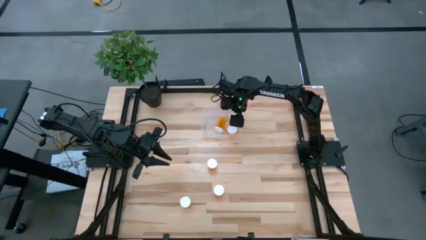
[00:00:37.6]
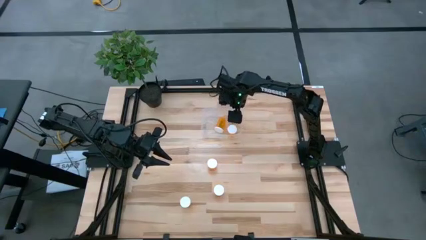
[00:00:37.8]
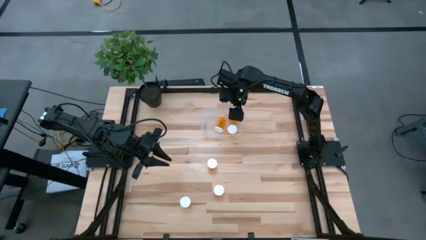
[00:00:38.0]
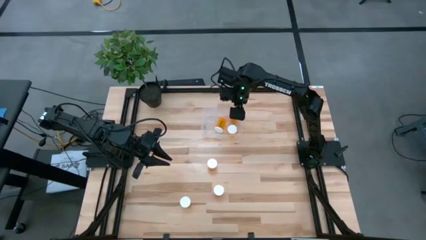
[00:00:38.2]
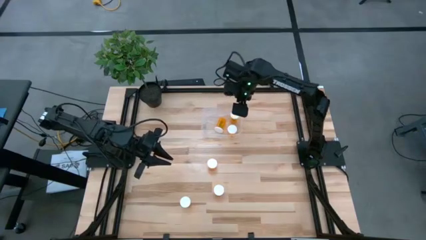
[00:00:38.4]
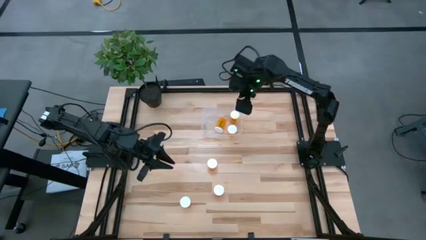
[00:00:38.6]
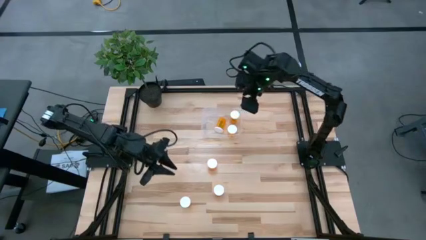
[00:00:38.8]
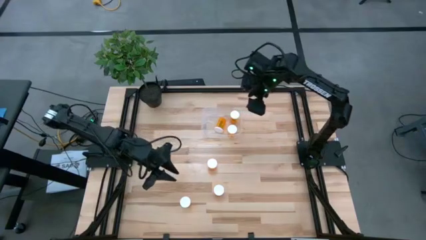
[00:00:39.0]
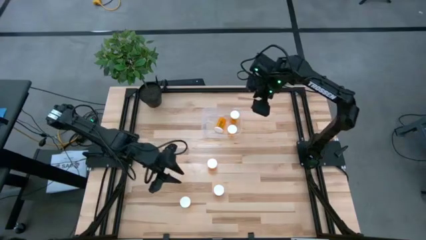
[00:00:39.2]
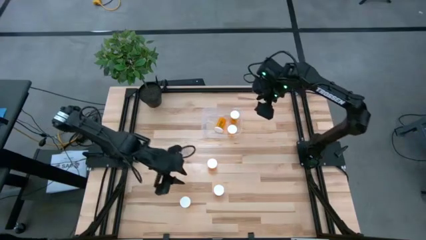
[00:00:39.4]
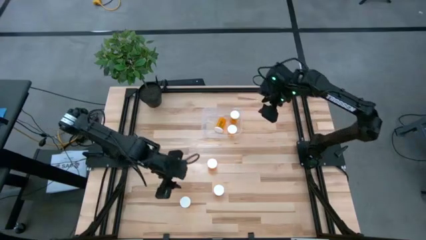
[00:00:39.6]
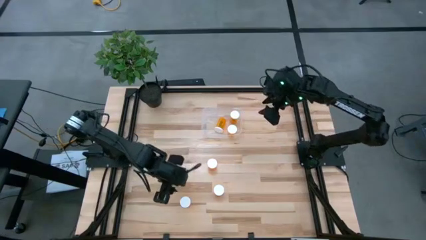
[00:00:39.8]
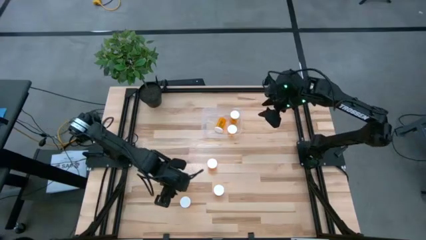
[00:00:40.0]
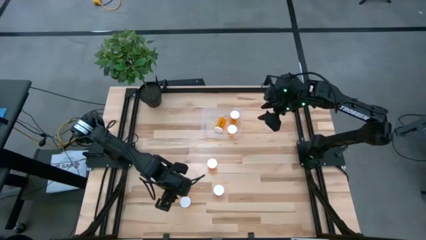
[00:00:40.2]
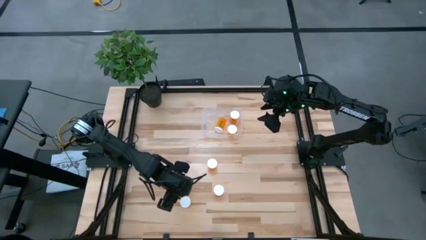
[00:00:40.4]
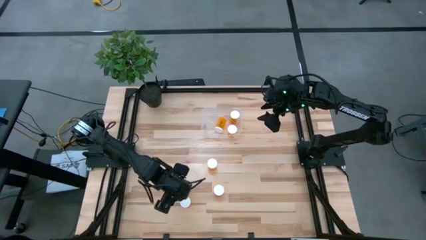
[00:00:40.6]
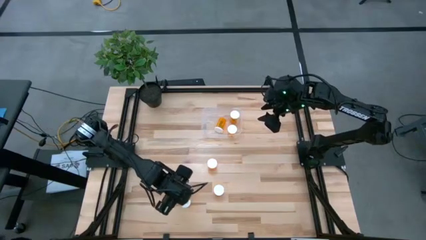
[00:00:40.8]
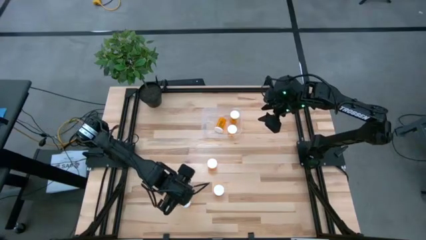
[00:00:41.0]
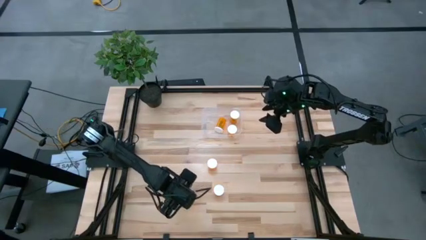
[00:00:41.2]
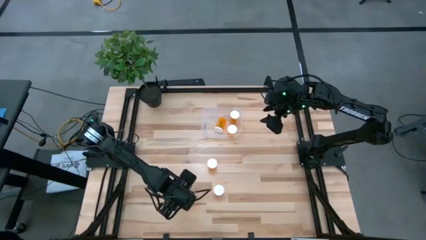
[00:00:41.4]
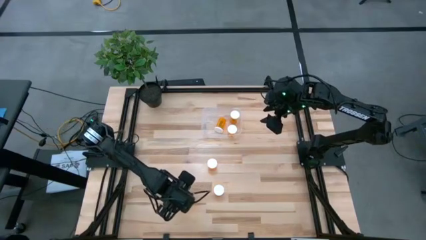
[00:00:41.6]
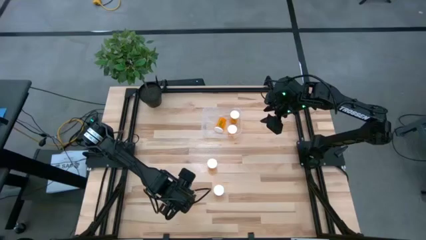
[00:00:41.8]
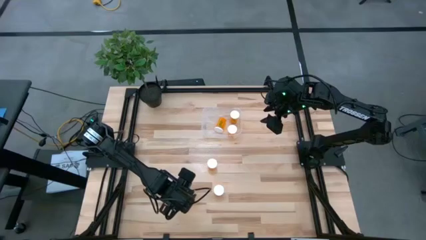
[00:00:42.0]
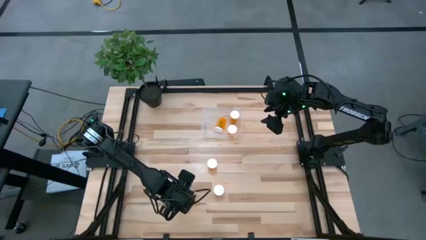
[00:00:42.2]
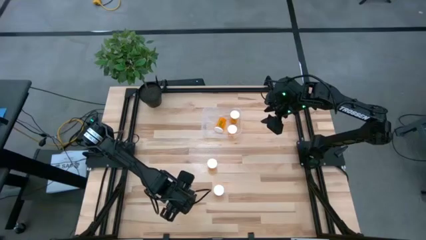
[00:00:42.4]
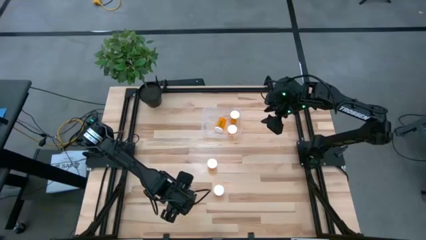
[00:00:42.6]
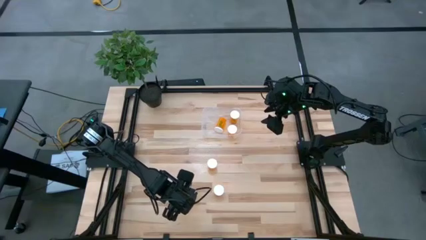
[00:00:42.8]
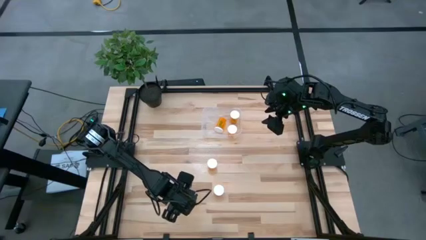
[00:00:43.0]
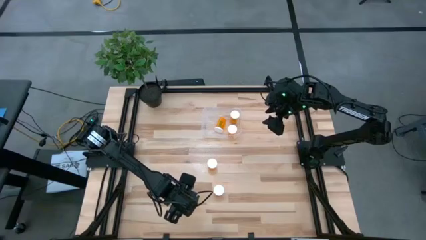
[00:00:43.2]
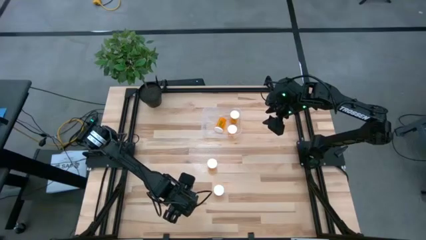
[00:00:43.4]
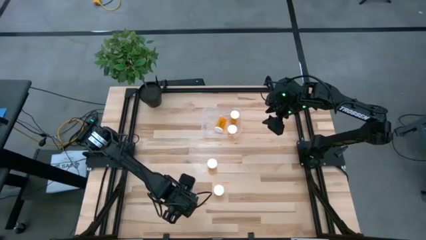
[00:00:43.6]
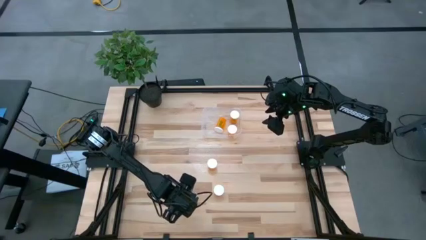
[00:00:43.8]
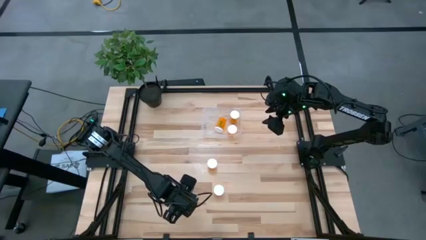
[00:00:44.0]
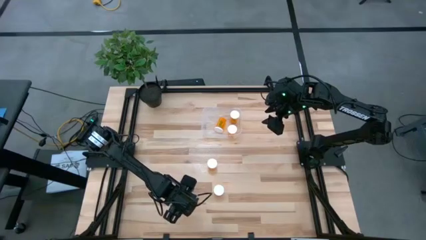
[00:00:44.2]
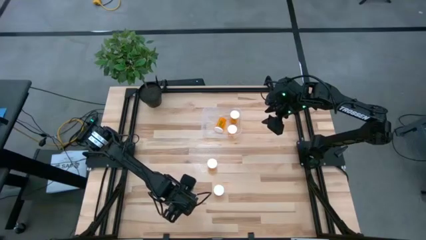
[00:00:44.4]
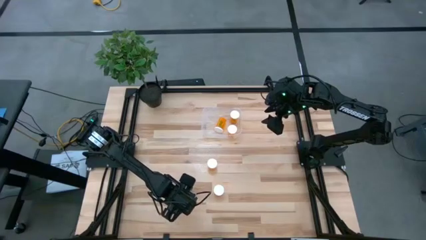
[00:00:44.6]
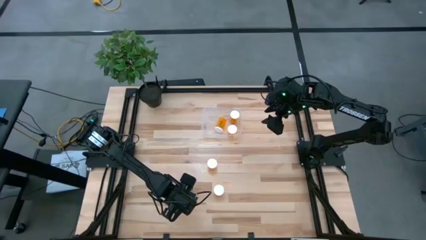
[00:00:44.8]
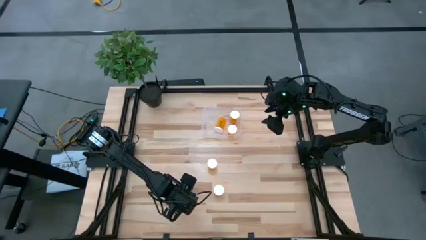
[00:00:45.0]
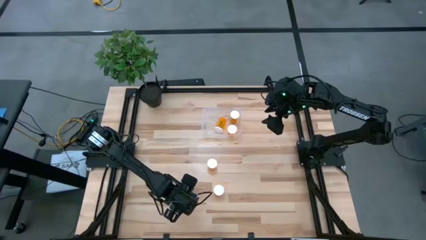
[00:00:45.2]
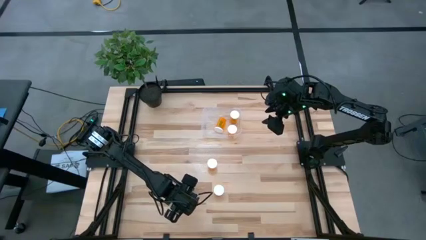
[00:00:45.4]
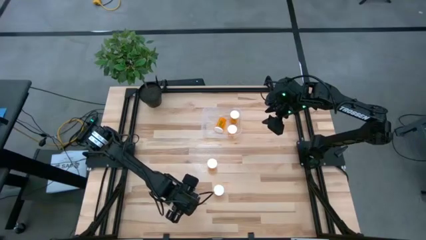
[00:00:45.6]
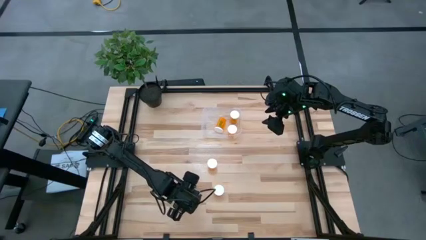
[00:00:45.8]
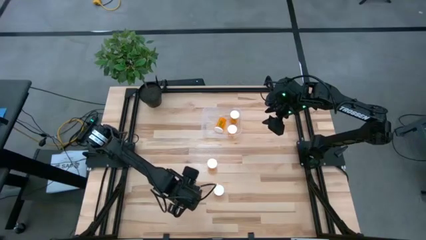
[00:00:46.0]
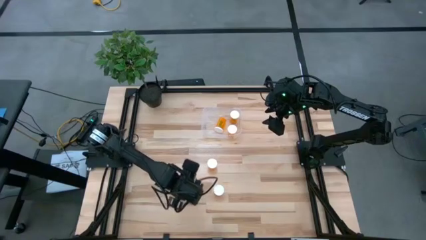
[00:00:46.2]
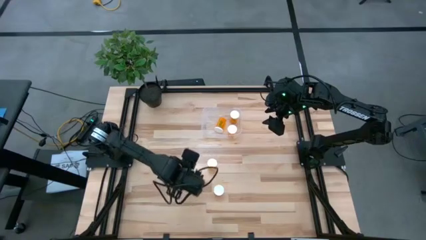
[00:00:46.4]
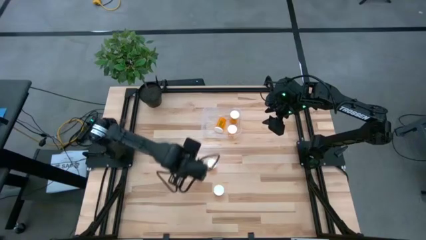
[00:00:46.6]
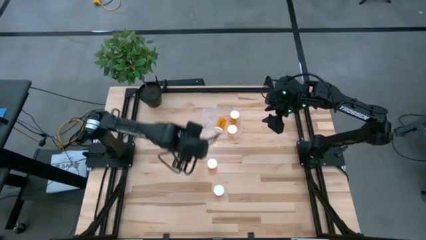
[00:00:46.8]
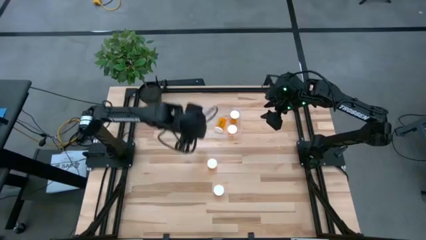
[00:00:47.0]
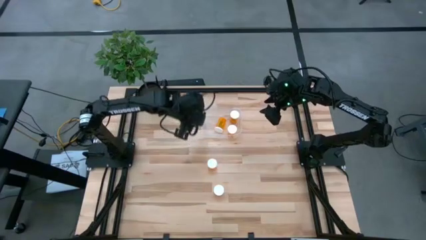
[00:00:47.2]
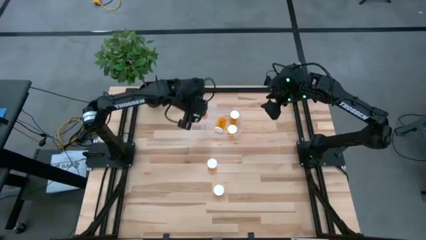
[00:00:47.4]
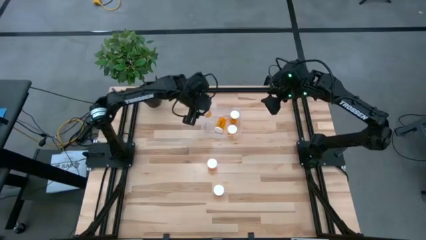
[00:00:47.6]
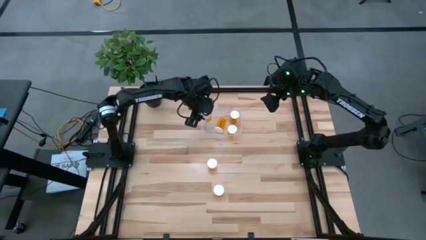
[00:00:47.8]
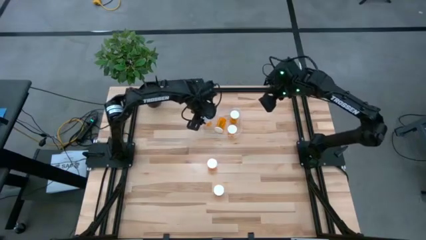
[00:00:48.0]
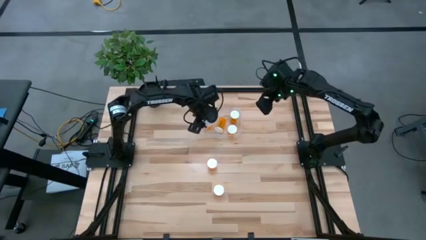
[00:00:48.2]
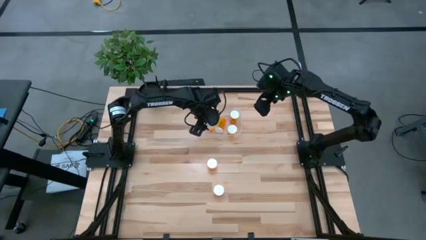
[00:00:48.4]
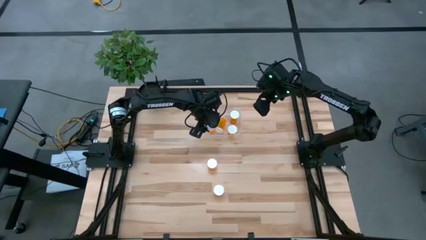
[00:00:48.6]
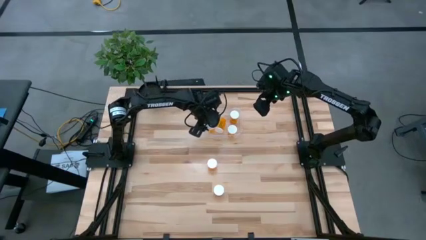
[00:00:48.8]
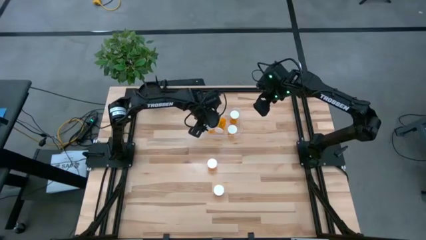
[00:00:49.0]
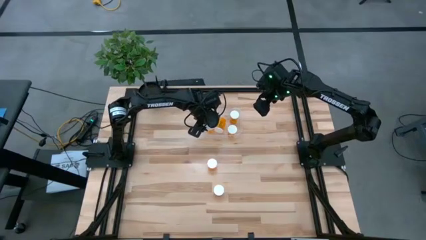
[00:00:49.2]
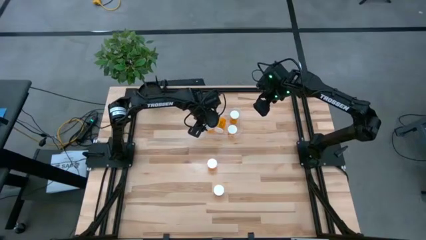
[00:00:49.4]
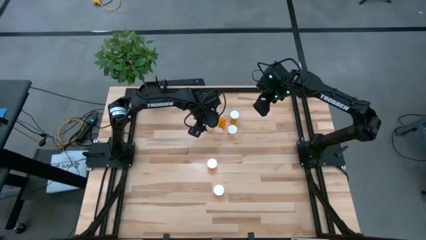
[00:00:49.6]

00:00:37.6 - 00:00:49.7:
Task: Pick and place pill bottles into a basket
Put the orange pill bottle into the transparent bin
